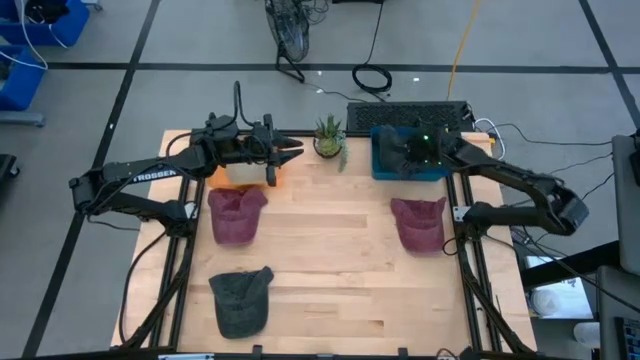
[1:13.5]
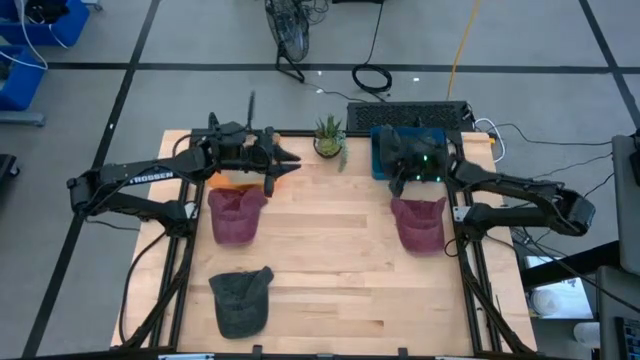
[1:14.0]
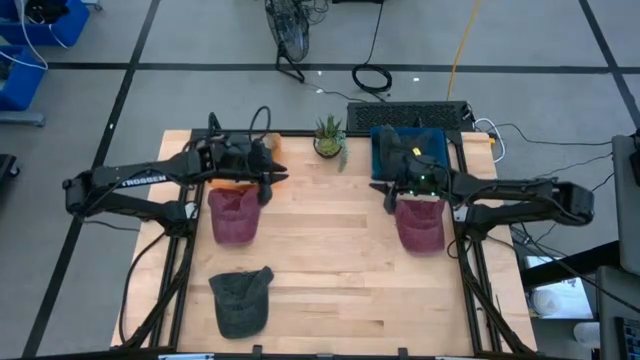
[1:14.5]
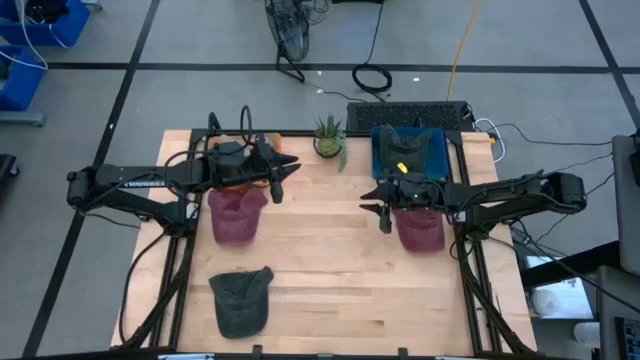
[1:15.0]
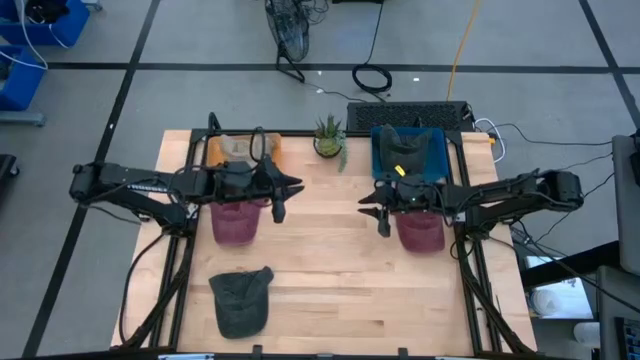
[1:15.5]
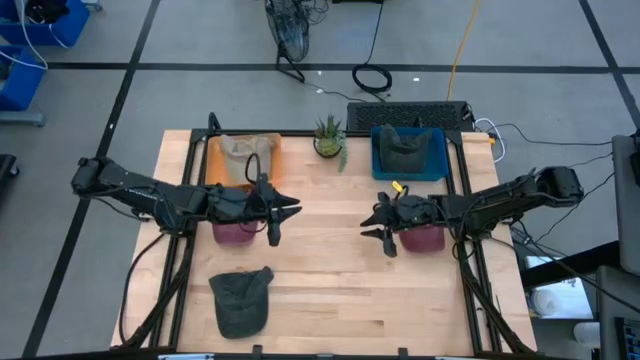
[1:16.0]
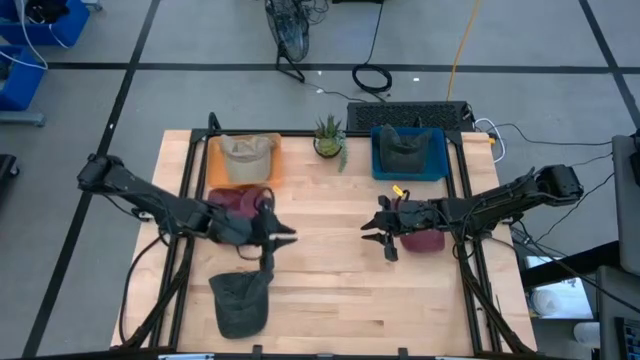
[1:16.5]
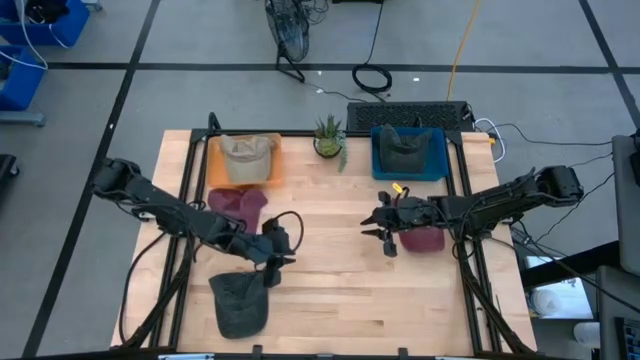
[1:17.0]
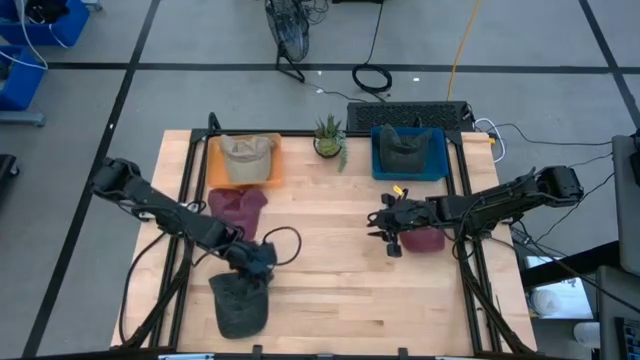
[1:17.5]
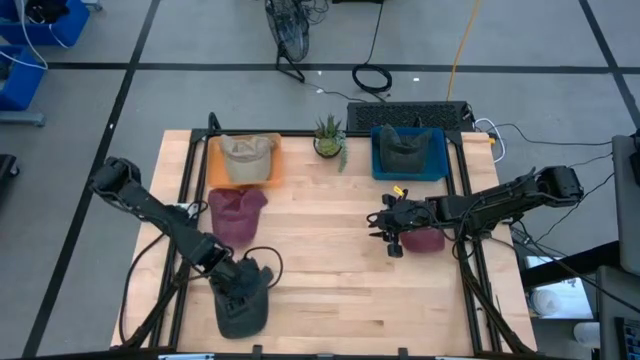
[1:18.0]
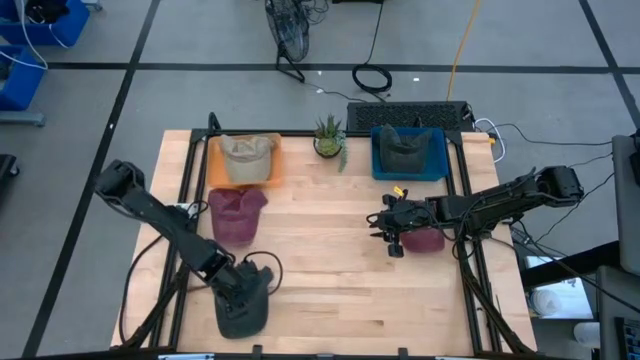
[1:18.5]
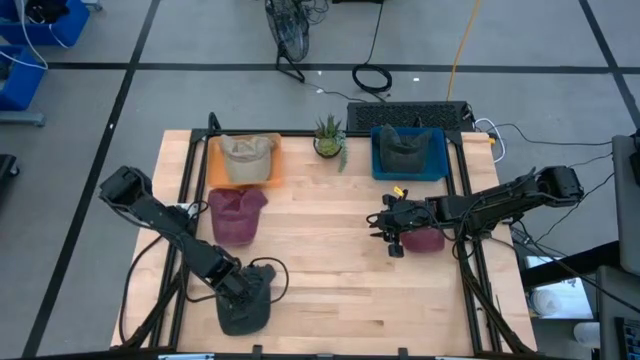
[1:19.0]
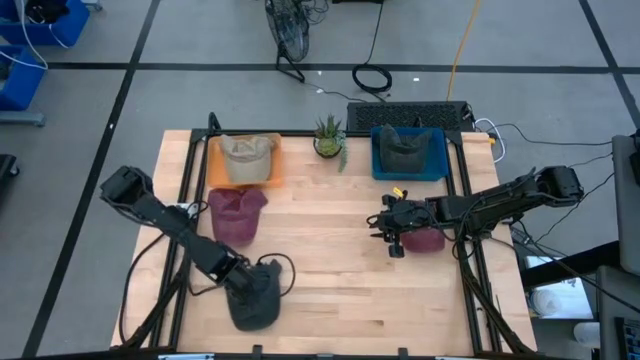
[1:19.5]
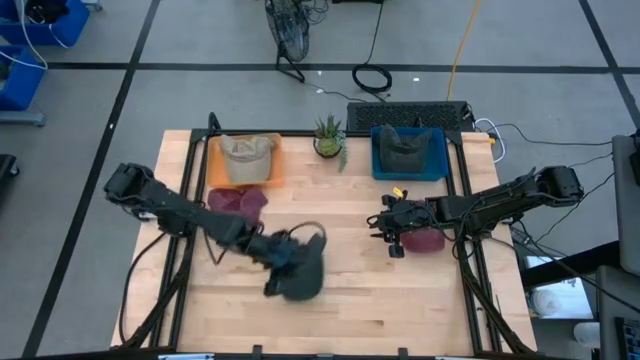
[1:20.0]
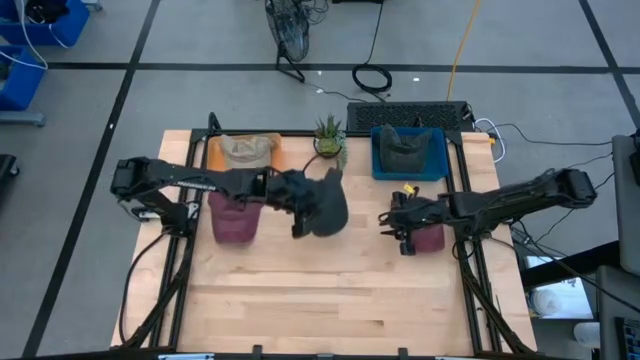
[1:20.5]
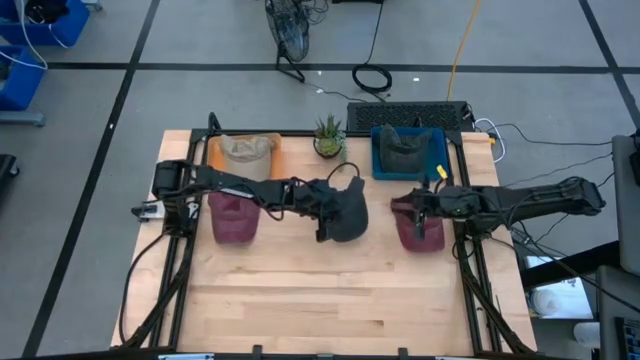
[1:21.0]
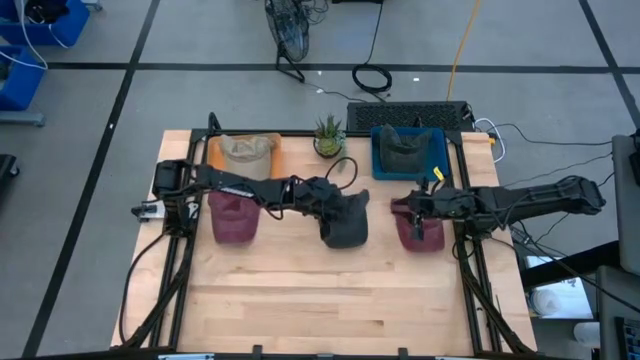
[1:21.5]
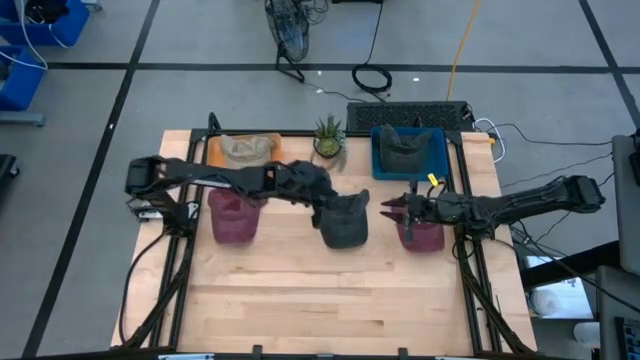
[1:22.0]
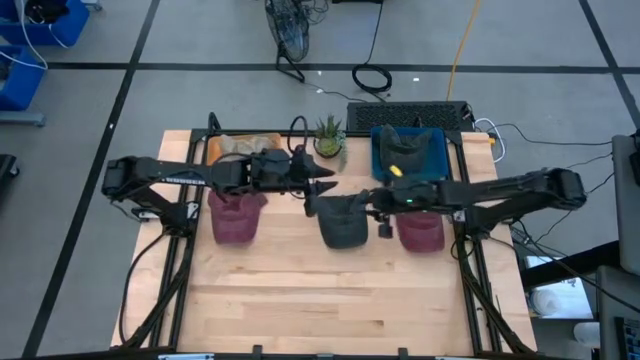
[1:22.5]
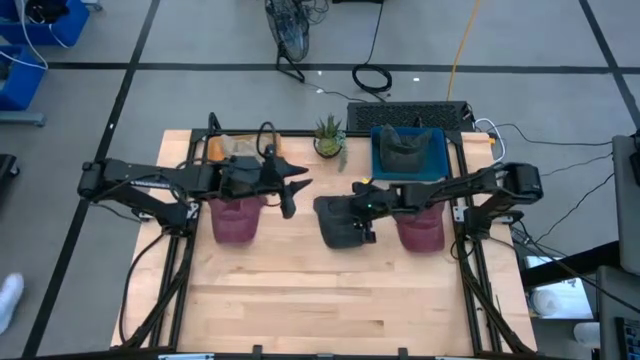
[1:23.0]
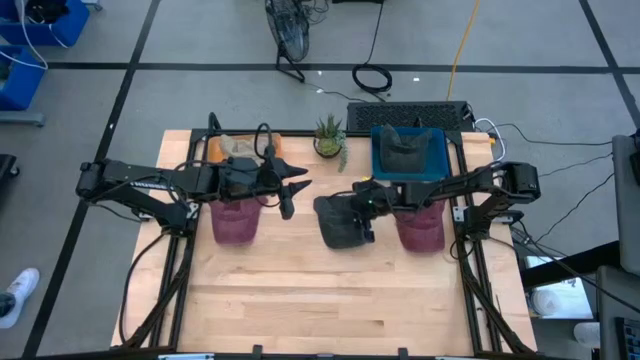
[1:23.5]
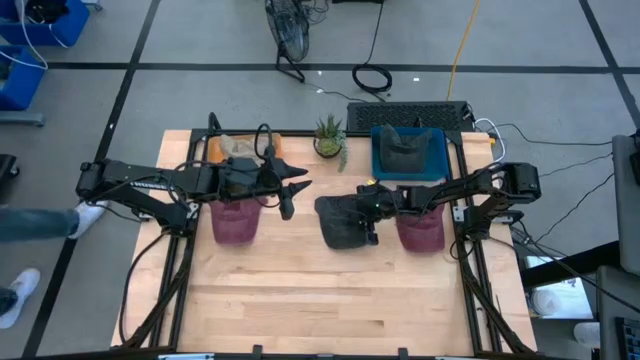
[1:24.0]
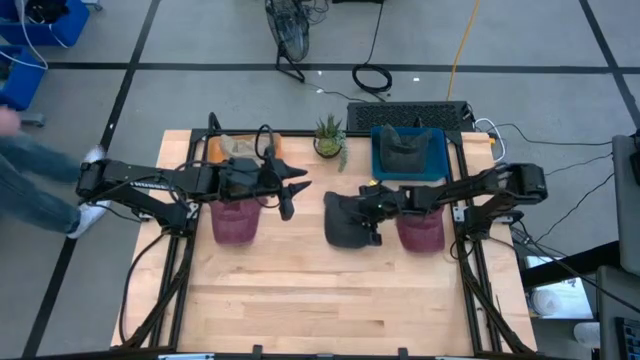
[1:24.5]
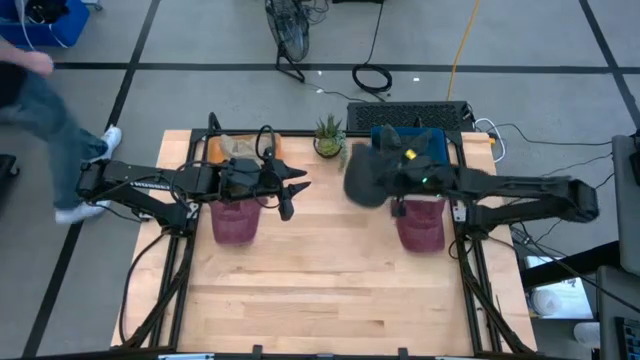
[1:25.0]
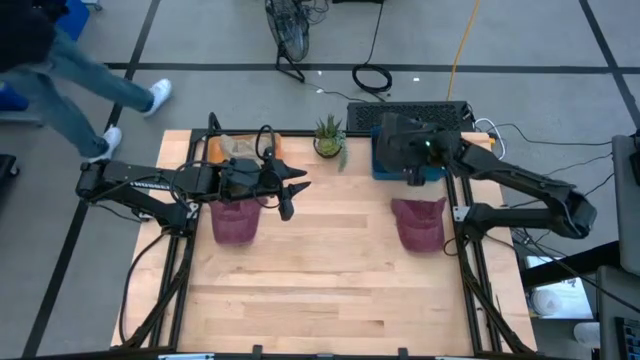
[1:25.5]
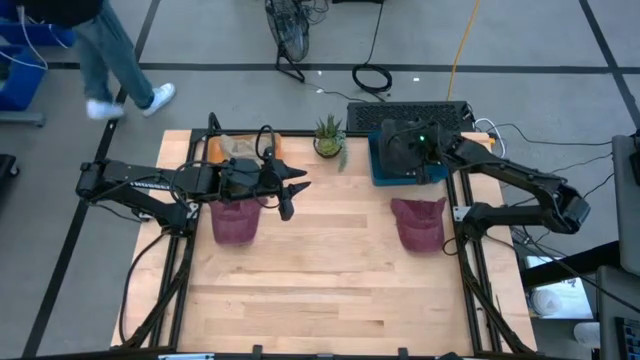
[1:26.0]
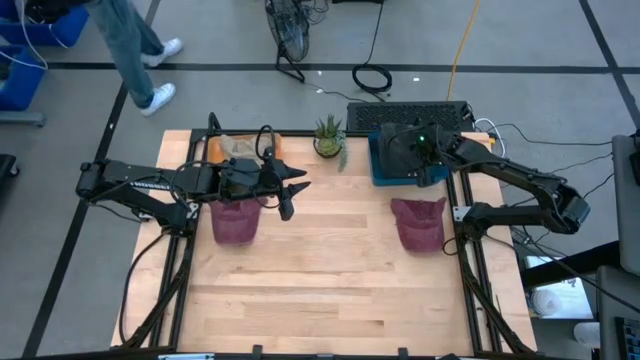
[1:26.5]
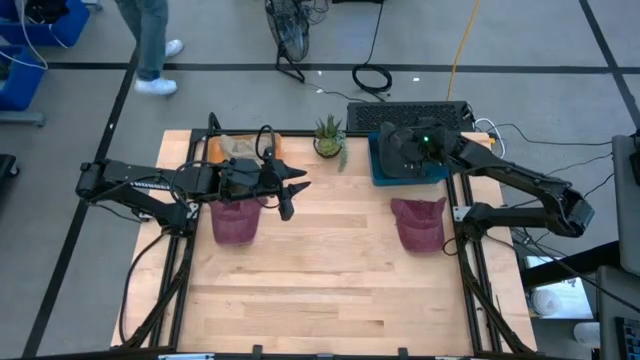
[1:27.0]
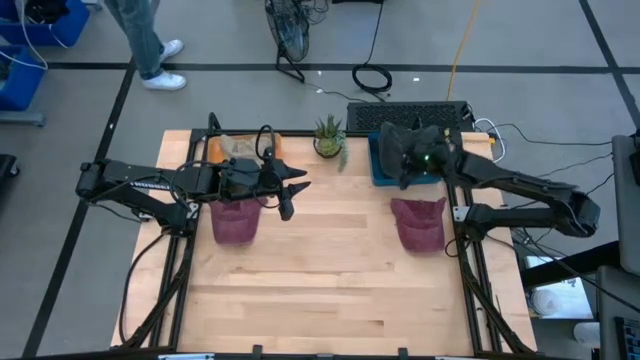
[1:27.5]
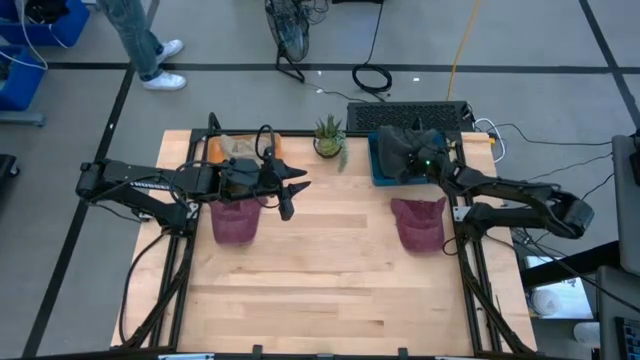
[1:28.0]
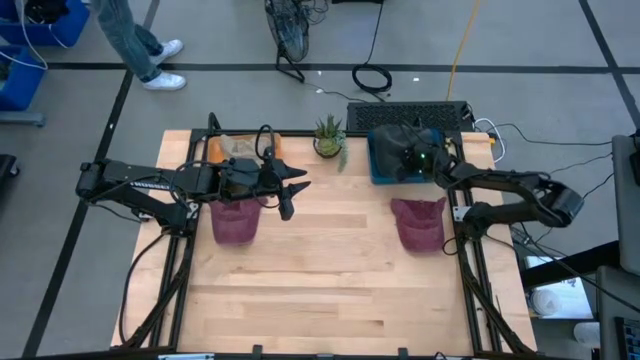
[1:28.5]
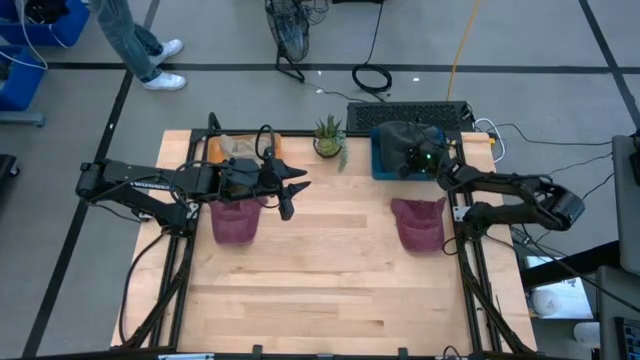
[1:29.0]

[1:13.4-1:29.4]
Task: Pick & Place hat
Put the black cap into the blue bin

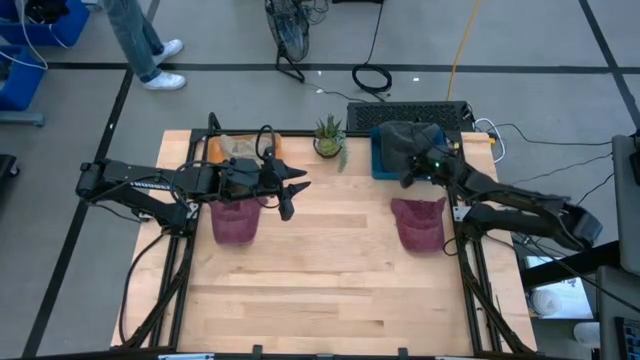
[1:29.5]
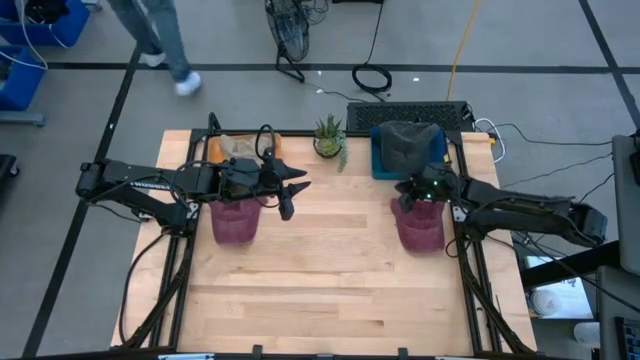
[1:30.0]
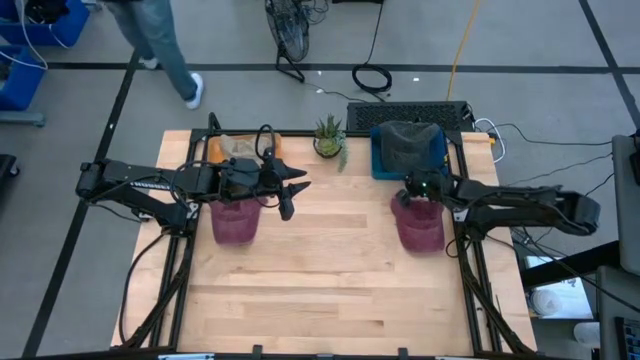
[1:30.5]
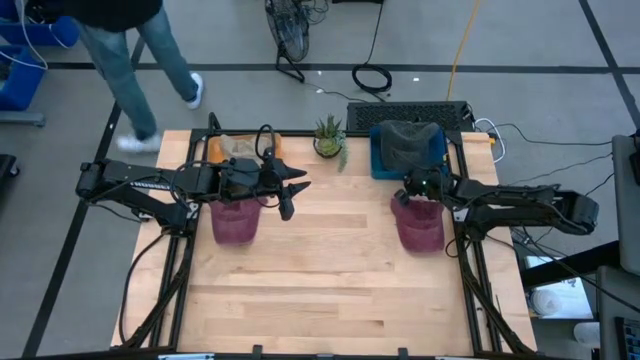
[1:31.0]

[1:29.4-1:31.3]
Adjust the blue bin

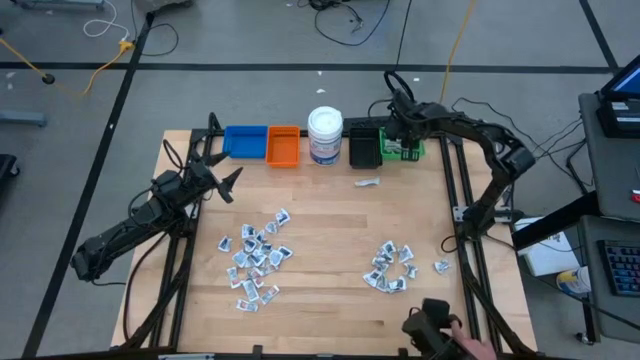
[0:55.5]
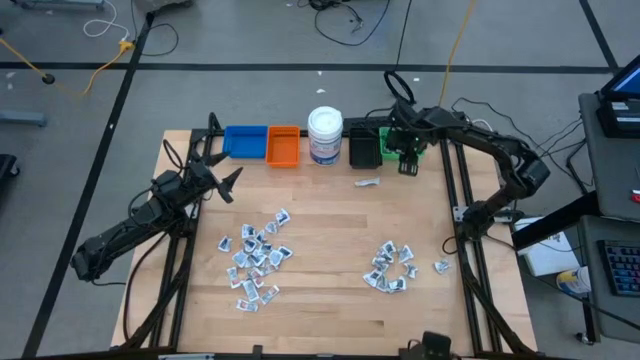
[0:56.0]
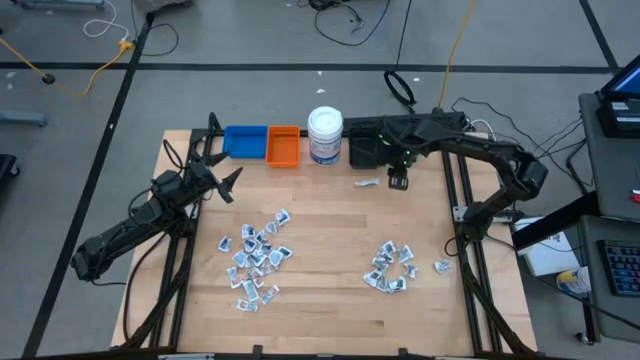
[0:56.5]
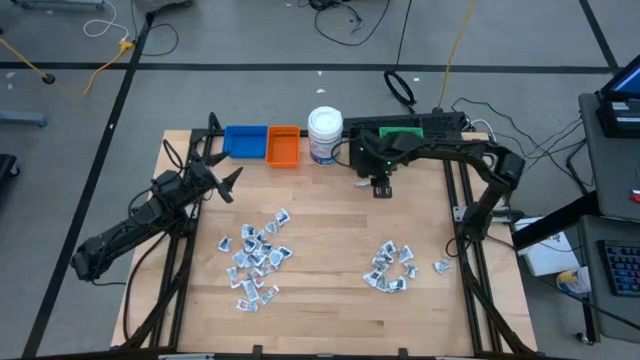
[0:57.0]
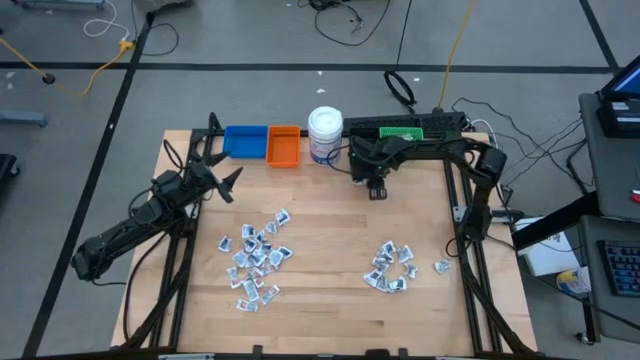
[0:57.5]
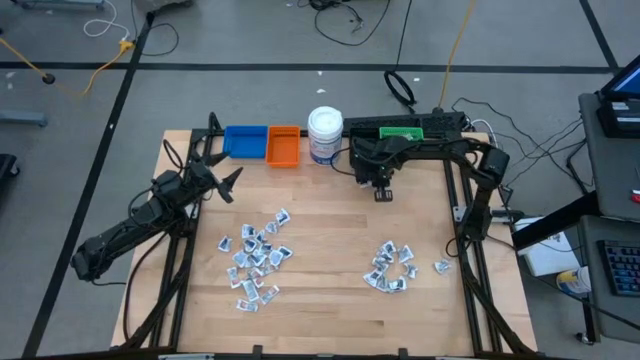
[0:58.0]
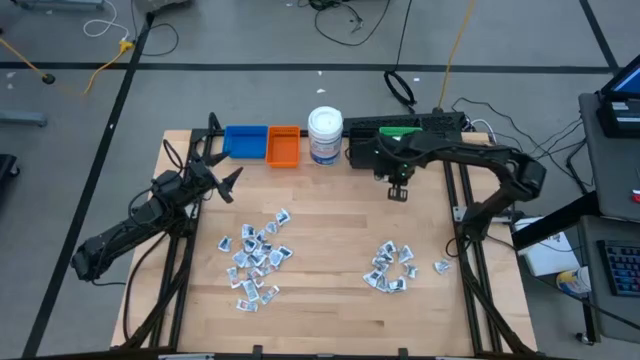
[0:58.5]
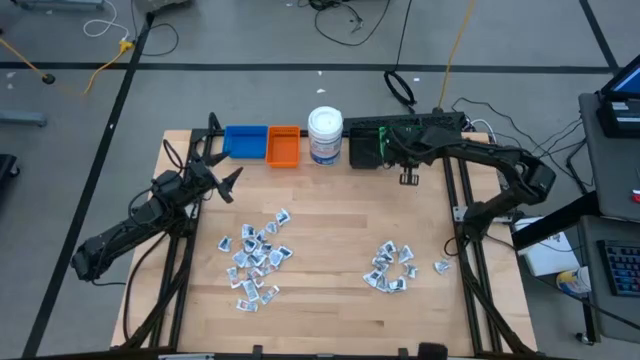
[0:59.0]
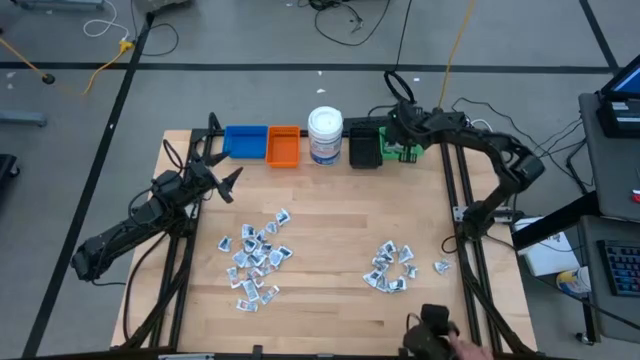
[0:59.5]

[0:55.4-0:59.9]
Task: Pick & Place First Aid Supplies
Put the bandage into the green bin
